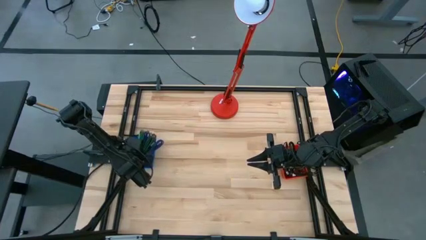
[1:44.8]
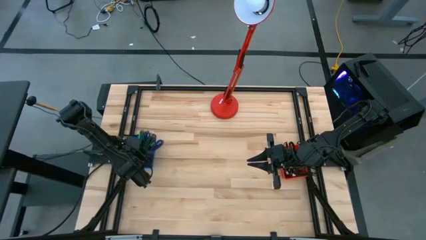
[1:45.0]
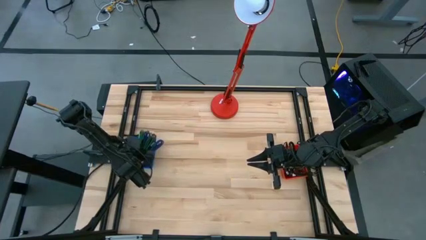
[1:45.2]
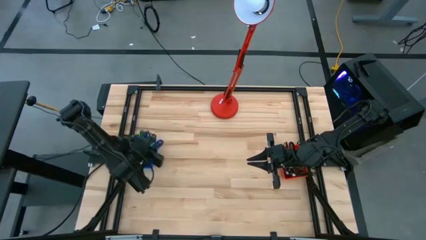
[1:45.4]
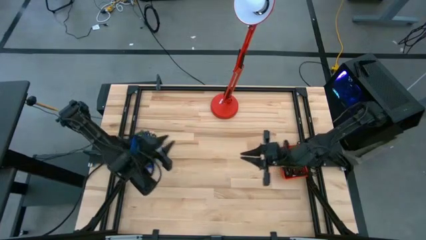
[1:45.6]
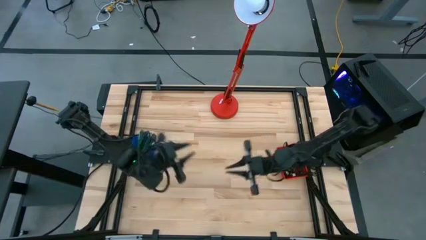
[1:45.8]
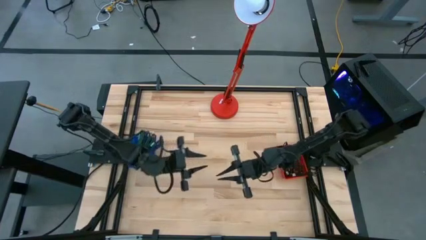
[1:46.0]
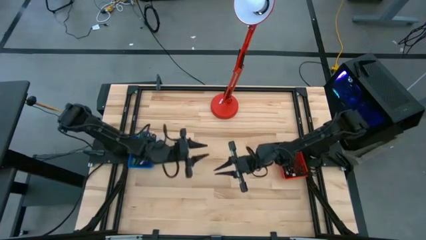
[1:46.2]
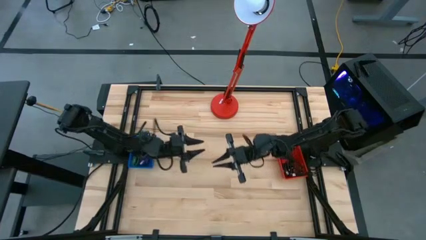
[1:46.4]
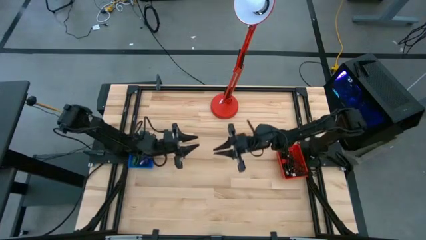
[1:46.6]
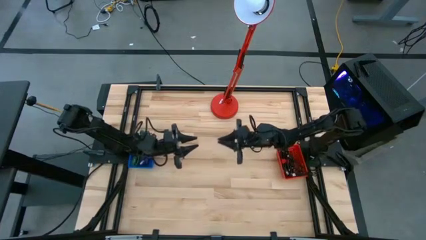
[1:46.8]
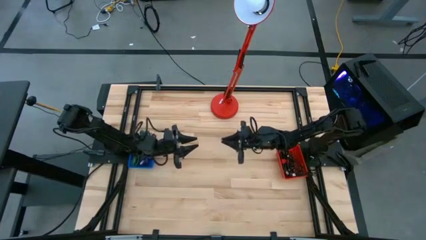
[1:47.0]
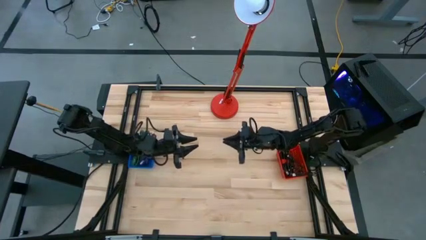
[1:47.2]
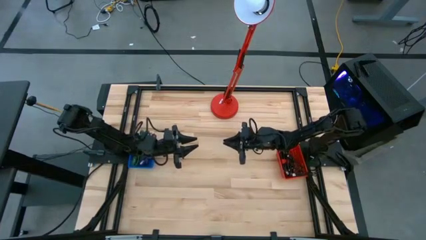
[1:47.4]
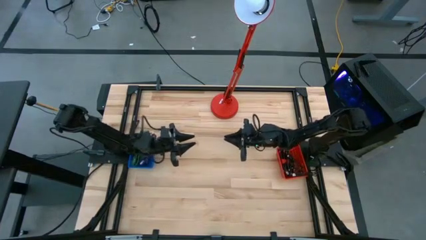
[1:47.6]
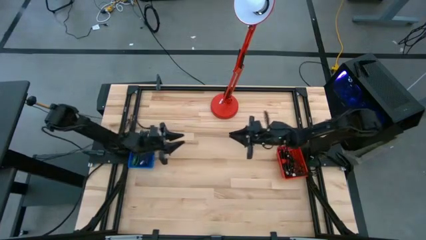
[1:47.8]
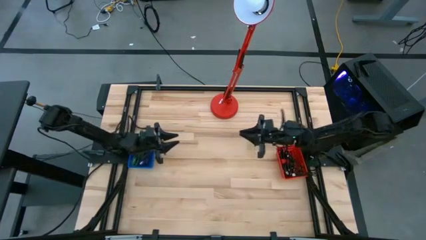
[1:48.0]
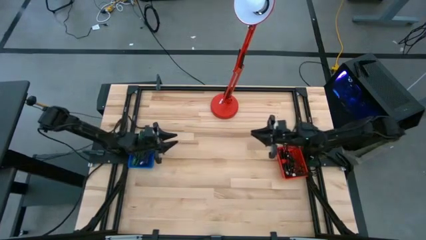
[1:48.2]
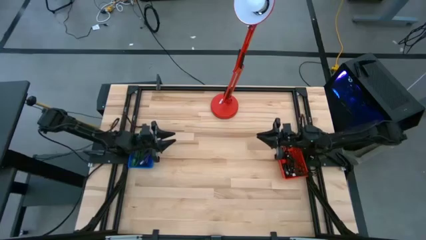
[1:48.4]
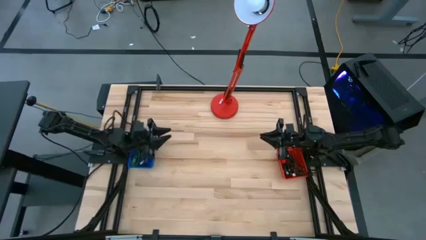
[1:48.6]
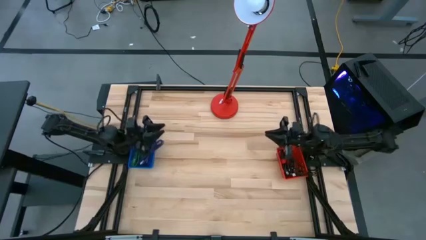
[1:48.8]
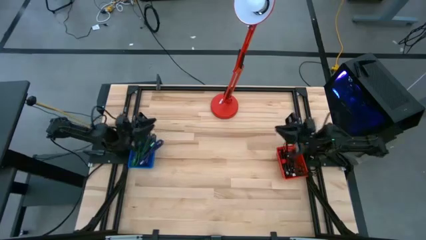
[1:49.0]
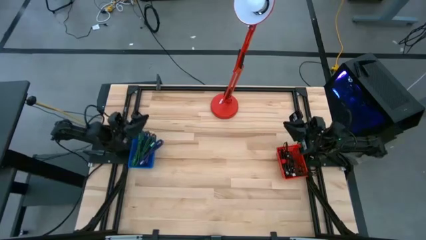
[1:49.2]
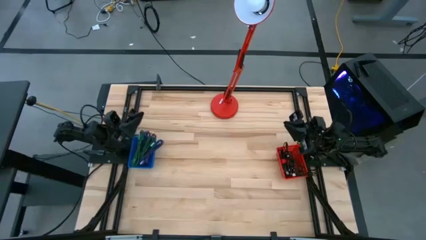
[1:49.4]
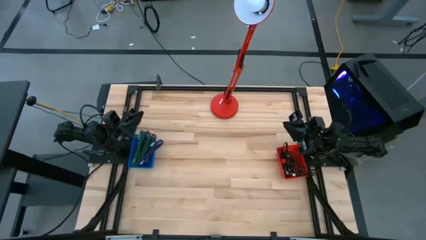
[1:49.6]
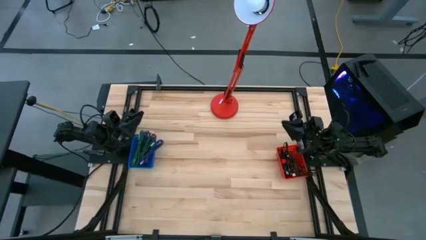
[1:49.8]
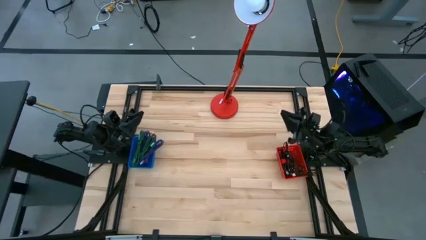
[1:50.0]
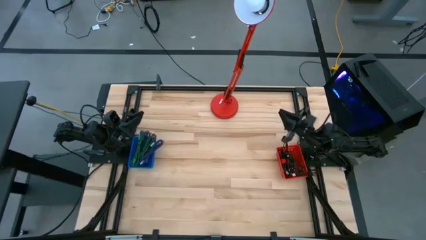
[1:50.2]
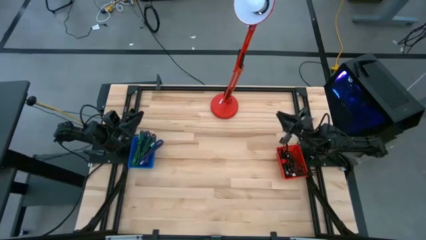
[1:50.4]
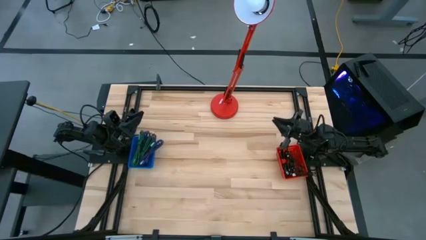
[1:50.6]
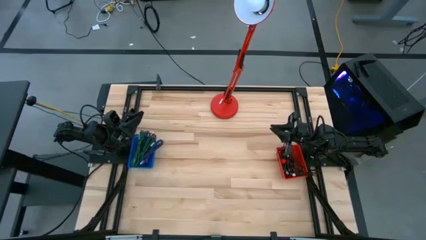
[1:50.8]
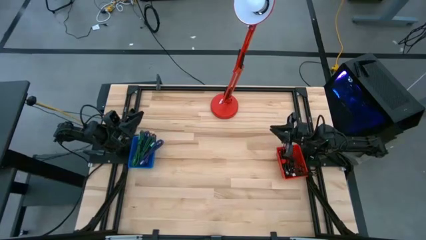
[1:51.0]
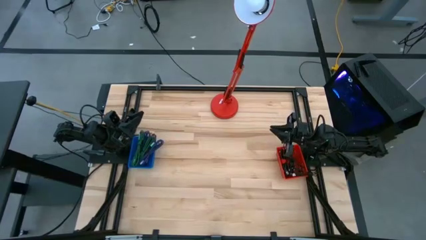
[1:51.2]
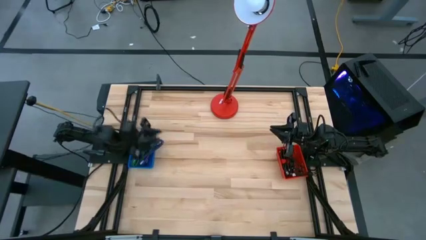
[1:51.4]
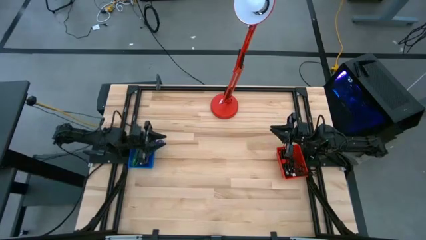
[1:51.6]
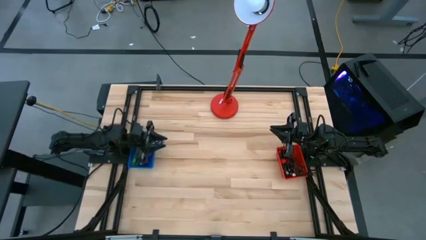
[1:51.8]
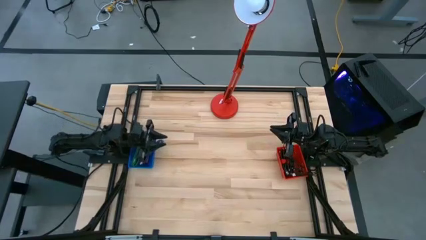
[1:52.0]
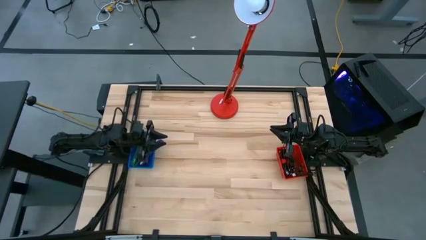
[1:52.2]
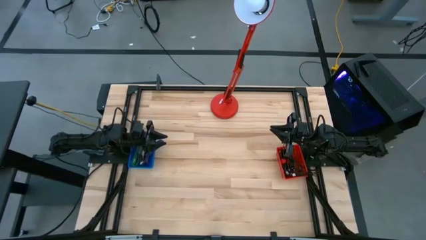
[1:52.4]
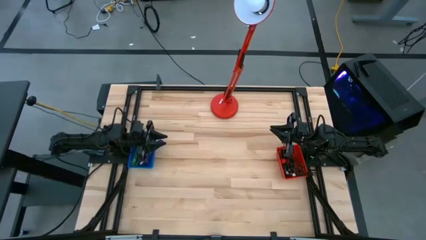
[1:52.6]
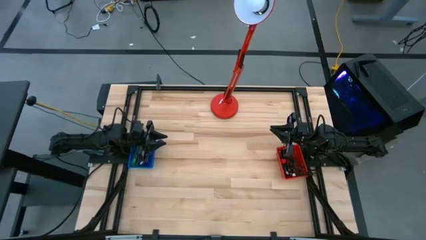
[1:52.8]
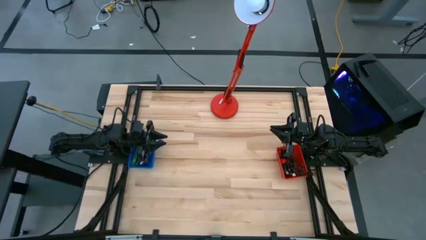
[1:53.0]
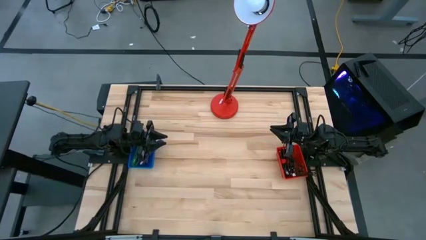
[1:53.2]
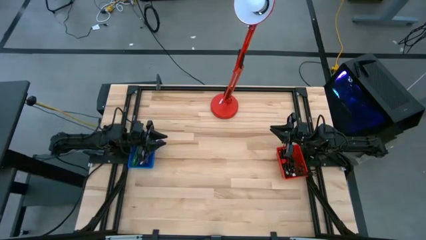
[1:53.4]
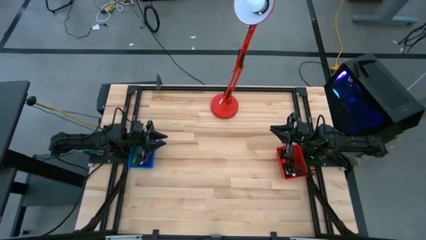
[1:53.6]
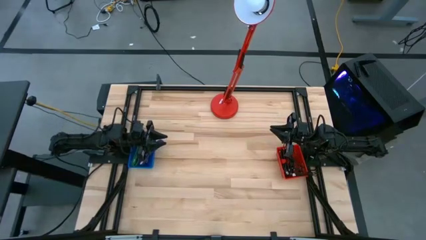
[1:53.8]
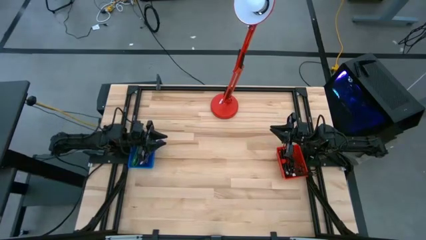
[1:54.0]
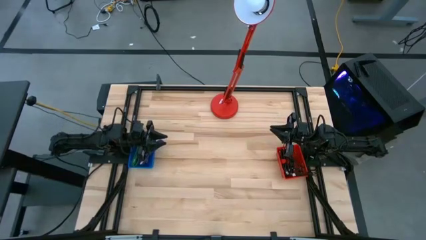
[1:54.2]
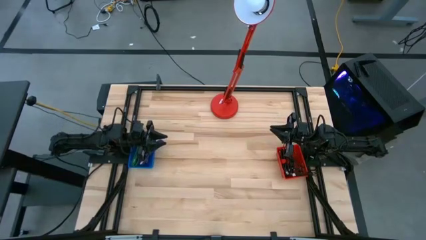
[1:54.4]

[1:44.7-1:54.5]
Task: Pick & Place USB Port
Return to Home Position

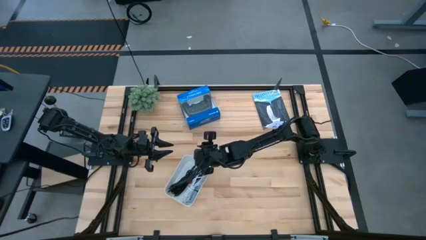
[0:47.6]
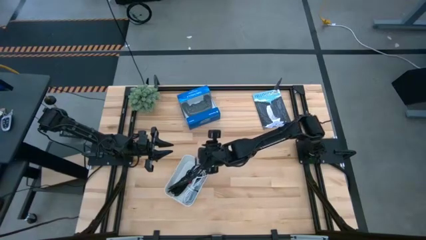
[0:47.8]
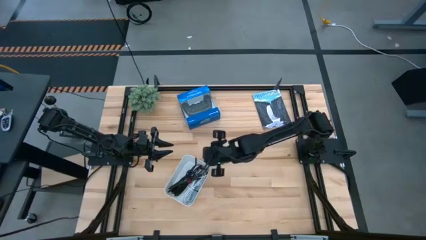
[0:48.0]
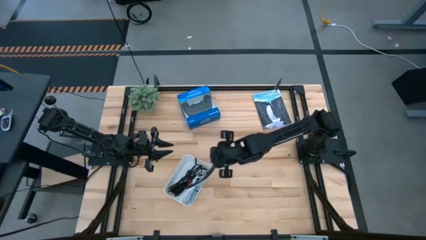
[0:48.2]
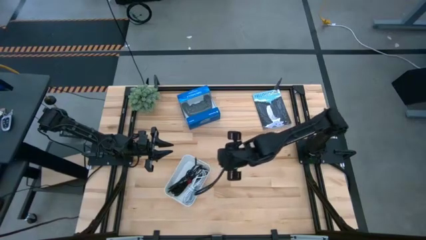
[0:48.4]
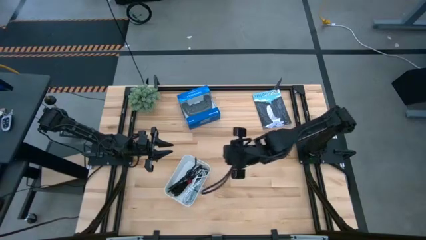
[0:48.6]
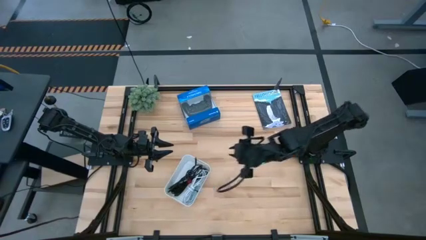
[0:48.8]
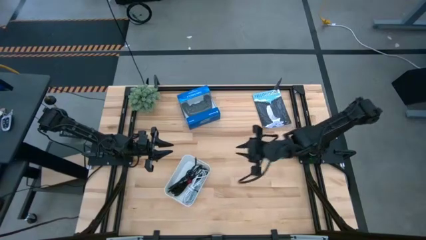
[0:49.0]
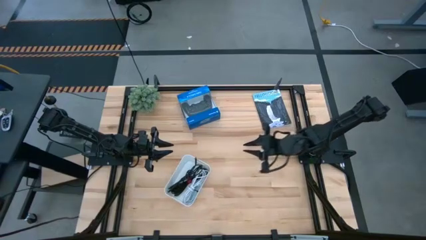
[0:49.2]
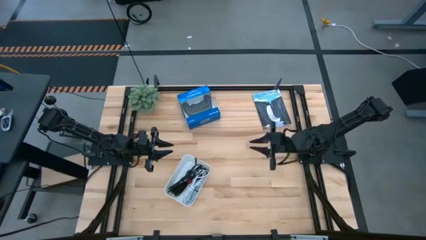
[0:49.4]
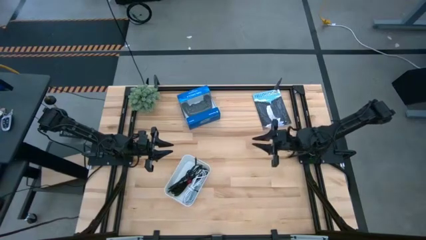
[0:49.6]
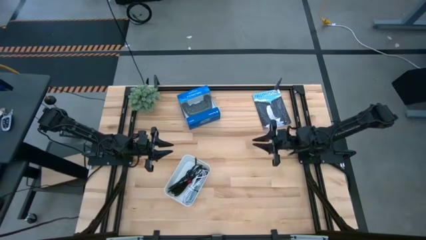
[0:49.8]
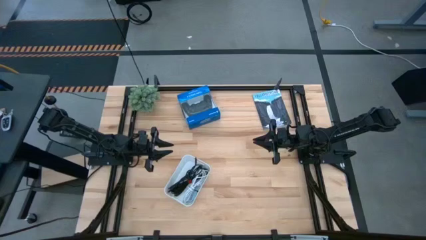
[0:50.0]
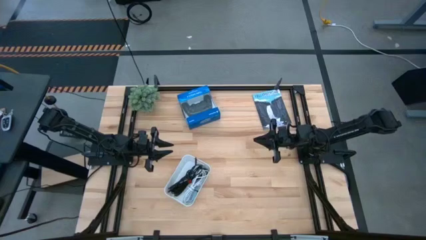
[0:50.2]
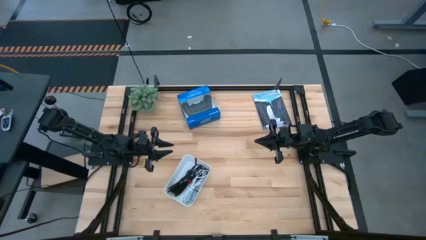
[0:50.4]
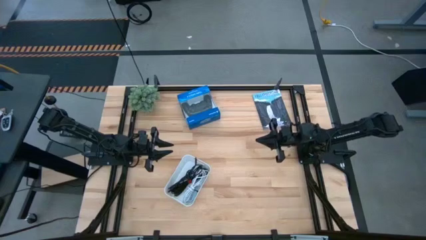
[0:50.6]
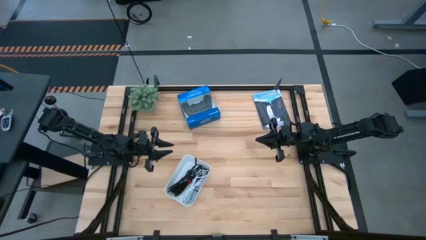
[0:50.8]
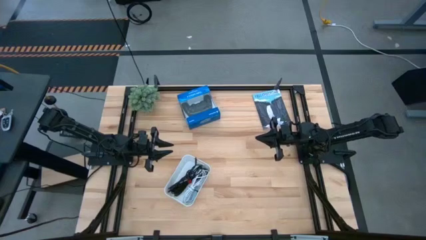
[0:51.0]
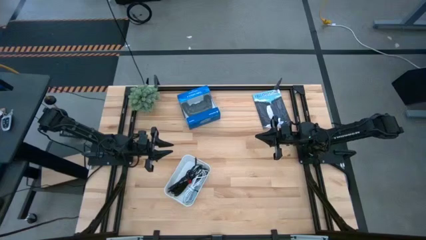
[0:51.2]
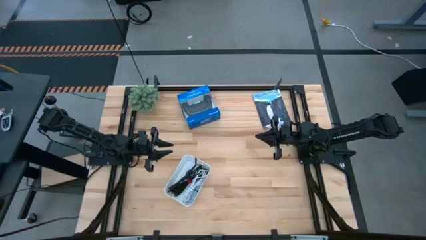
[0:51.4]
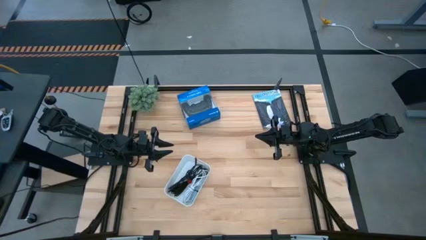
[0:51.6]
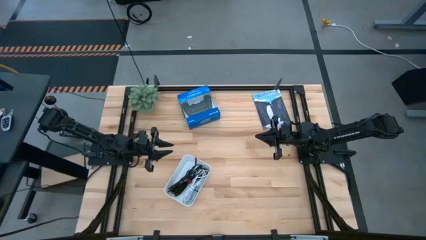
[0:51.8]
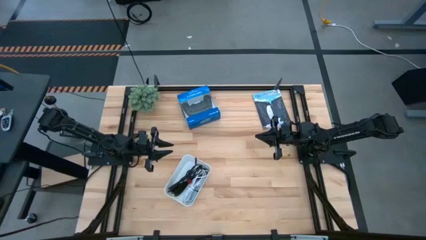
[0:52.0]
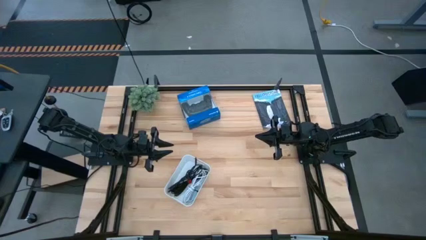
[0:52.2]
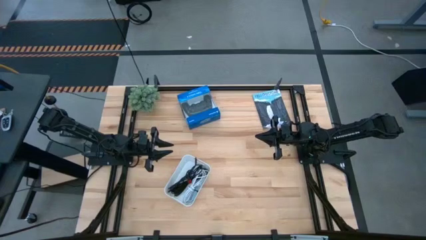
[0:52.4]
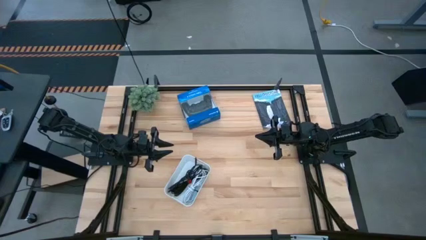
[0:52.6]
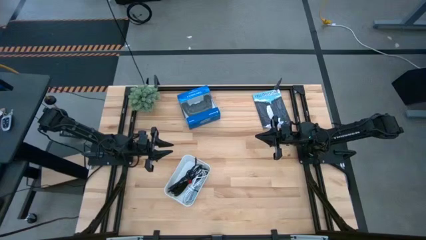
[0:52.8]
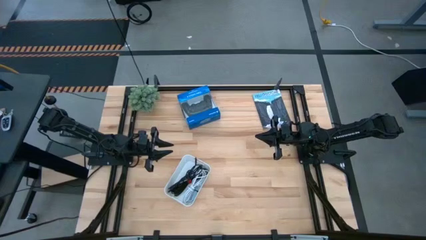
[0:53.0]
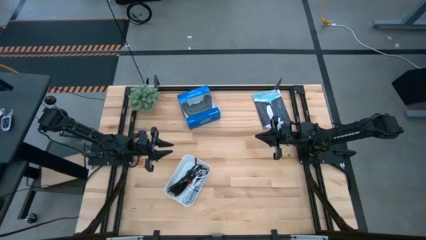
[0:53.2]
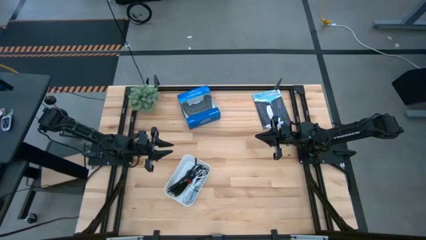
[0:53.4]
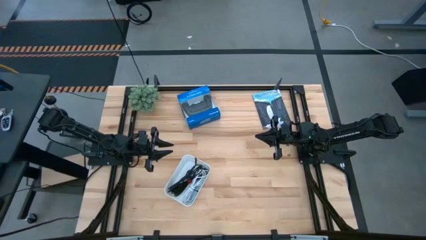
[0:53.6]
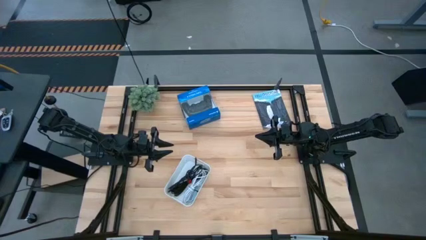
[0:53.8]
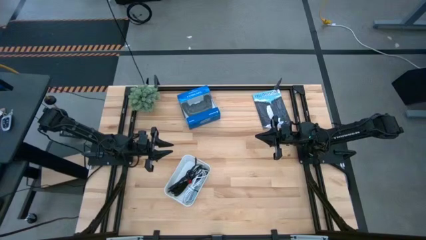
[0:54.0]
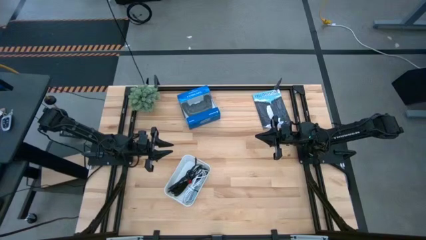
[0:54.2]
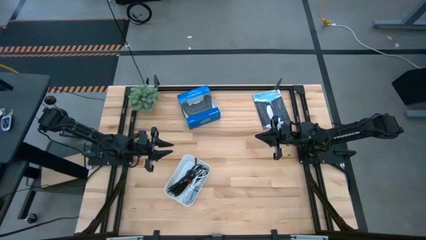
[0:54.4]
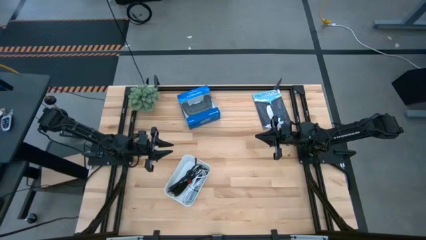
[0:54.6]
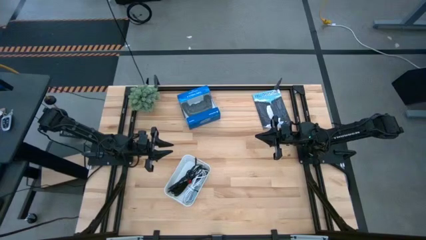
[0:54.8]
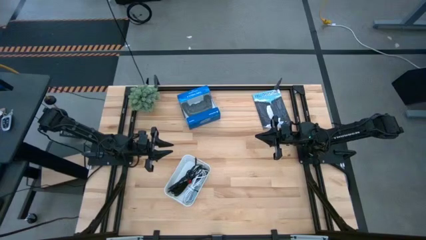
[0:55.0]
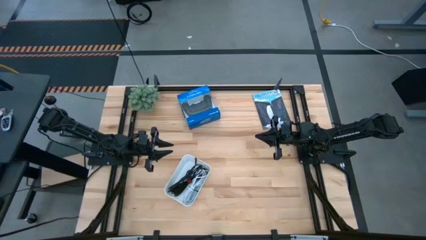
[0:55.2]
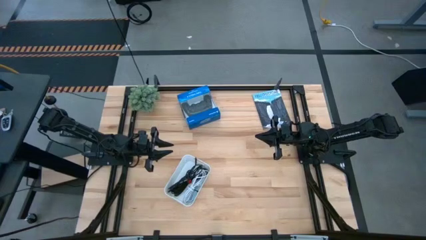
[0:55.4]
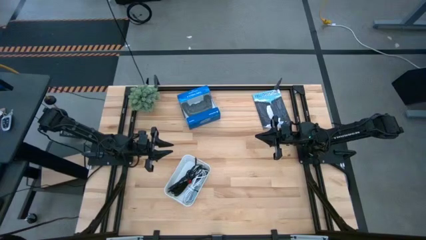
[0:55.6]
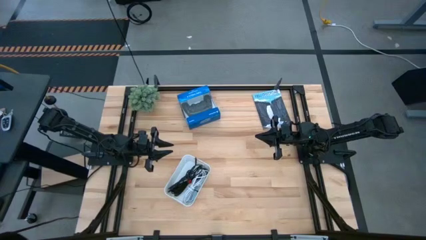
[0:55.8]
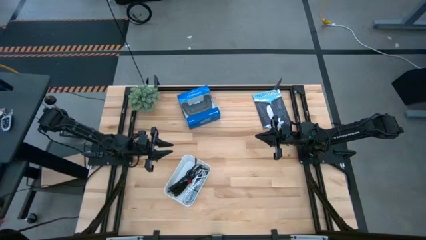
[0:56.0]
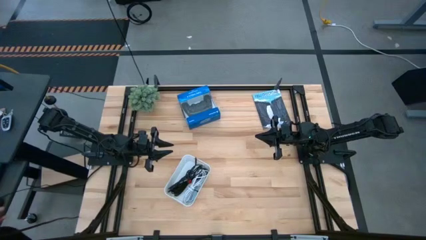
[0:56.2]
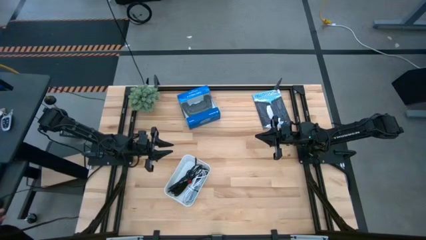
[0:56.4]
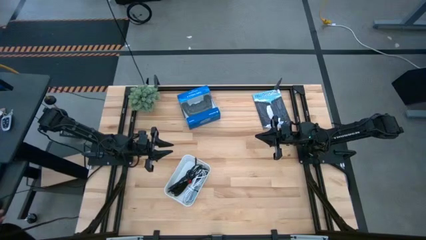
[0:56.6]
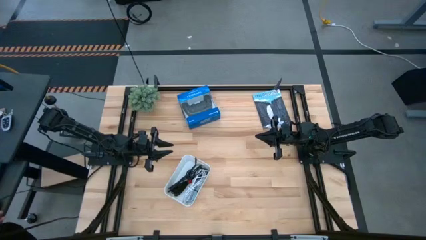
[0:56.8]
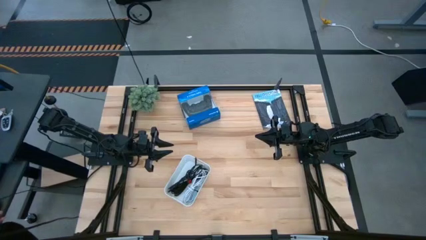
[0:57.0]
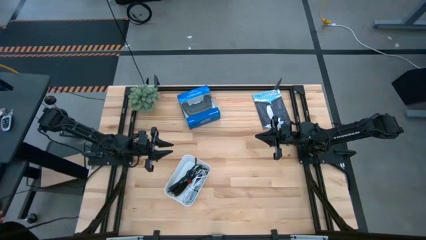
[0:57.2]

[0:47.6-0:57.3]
Task: Pick and place USB-C Cables
Return to Home Position
